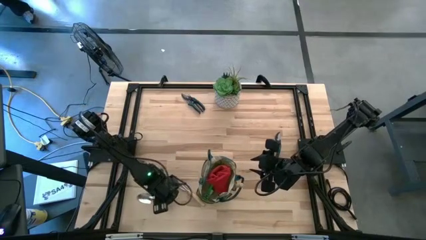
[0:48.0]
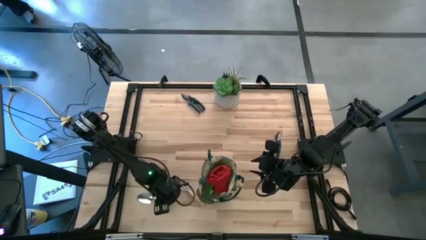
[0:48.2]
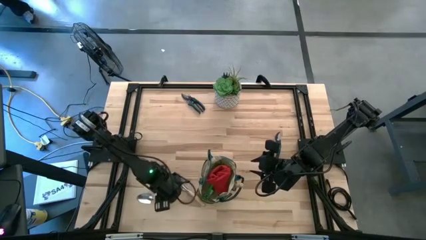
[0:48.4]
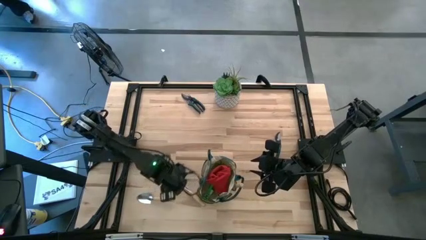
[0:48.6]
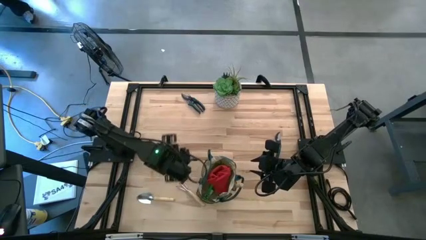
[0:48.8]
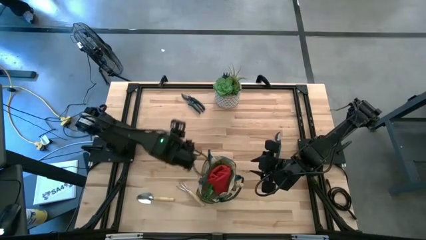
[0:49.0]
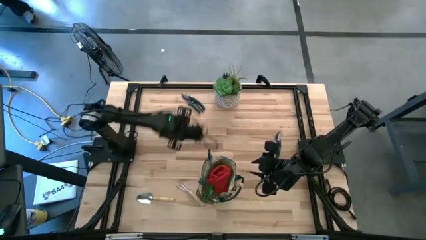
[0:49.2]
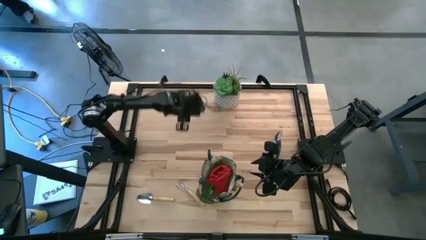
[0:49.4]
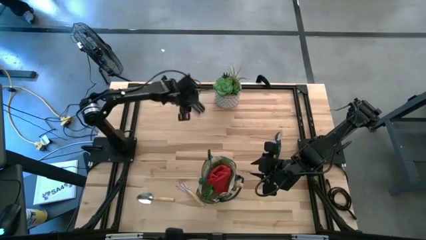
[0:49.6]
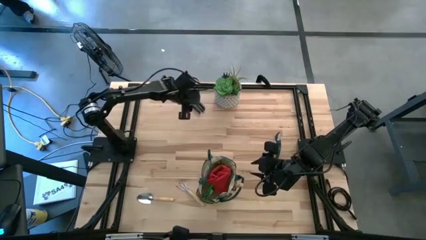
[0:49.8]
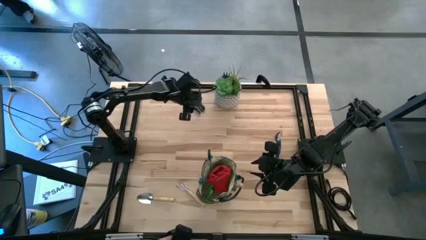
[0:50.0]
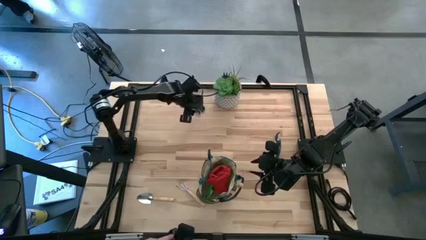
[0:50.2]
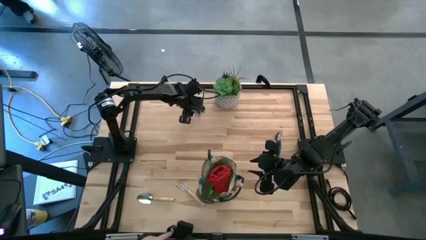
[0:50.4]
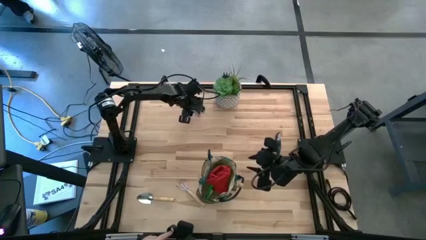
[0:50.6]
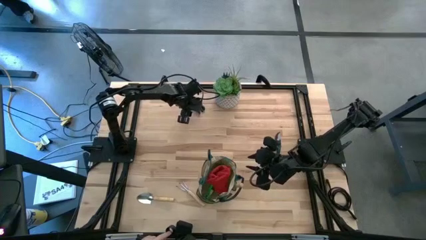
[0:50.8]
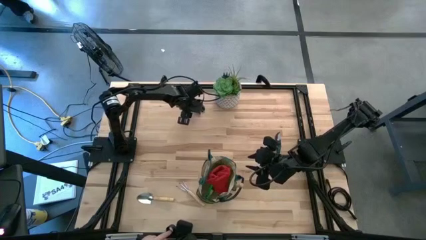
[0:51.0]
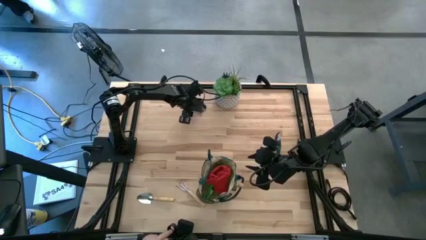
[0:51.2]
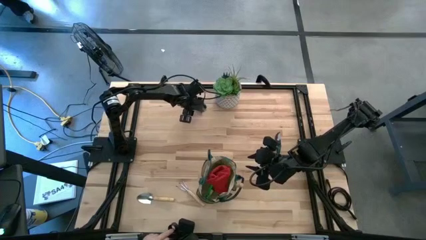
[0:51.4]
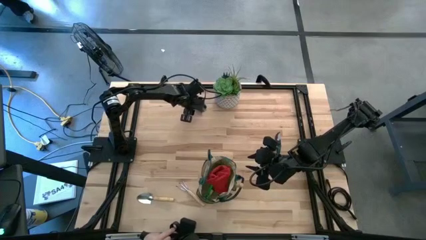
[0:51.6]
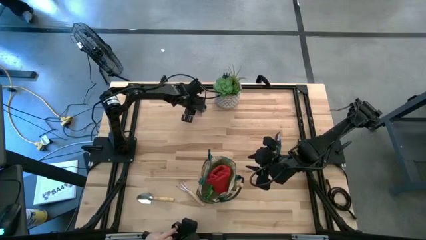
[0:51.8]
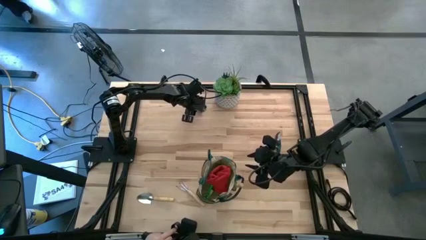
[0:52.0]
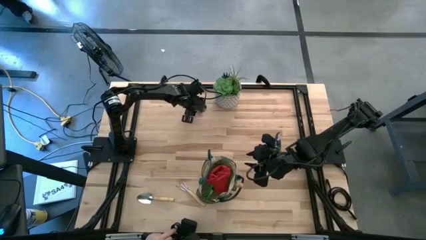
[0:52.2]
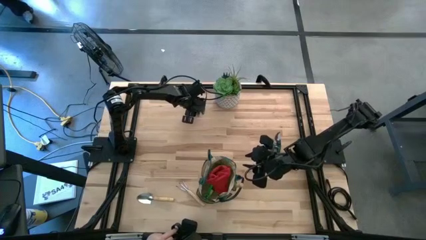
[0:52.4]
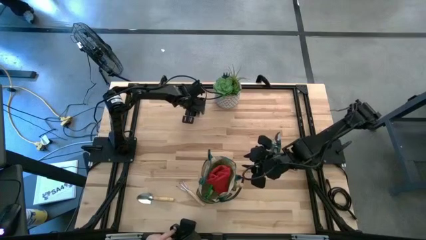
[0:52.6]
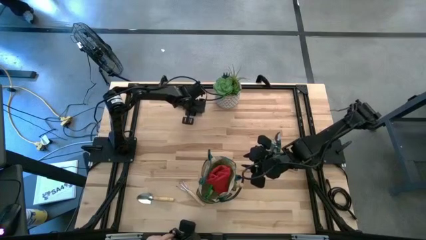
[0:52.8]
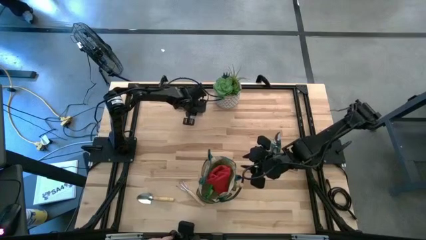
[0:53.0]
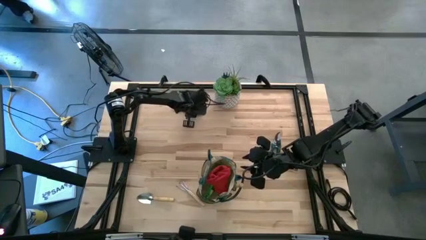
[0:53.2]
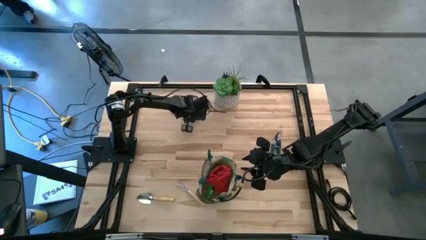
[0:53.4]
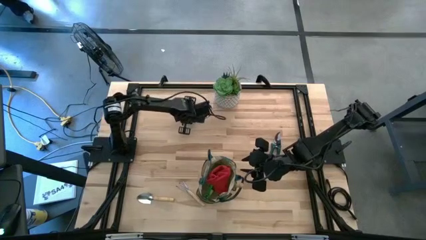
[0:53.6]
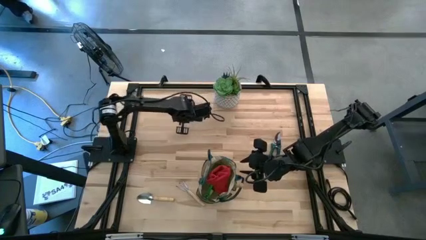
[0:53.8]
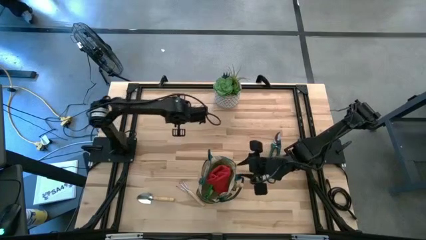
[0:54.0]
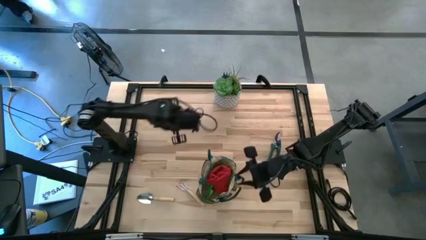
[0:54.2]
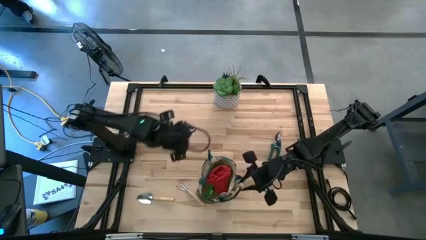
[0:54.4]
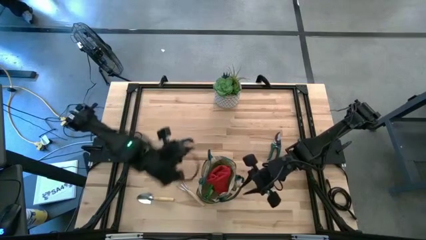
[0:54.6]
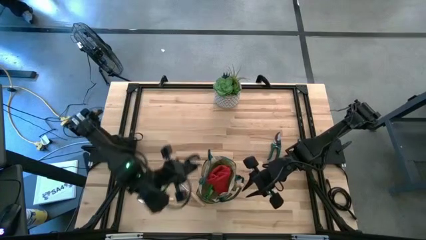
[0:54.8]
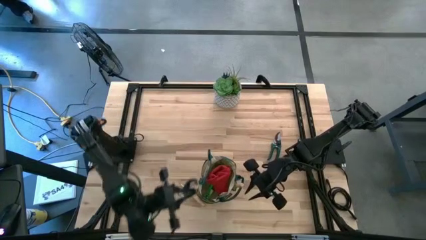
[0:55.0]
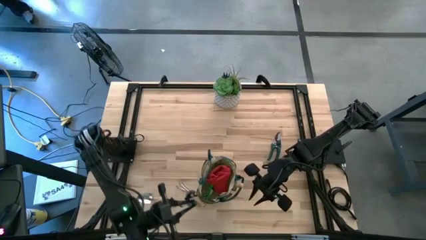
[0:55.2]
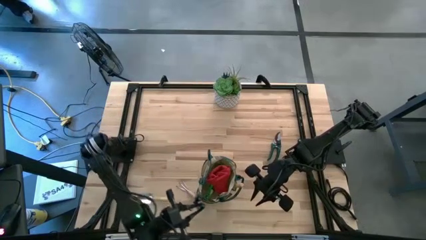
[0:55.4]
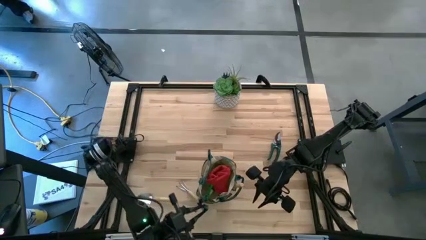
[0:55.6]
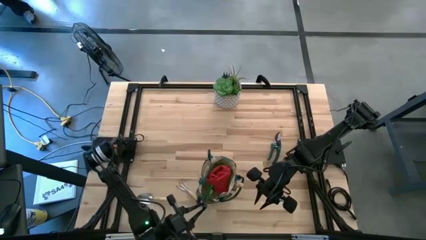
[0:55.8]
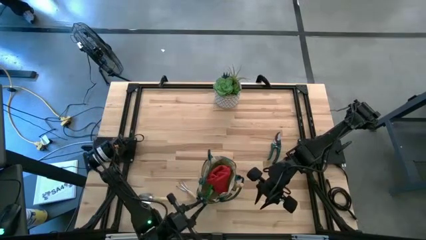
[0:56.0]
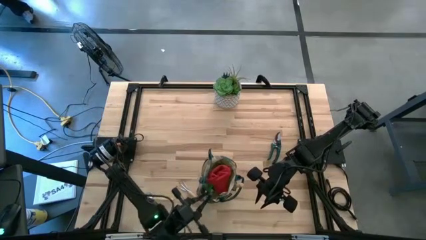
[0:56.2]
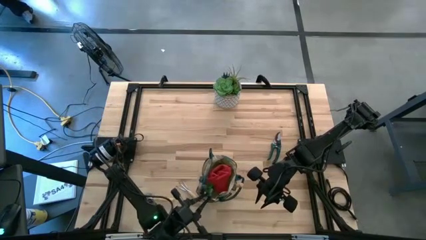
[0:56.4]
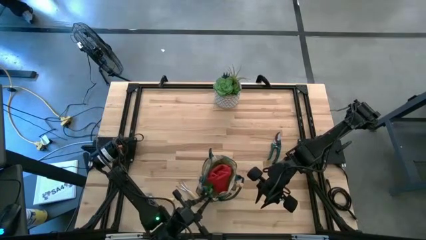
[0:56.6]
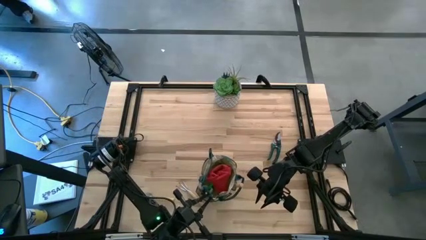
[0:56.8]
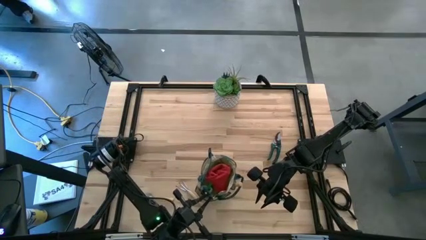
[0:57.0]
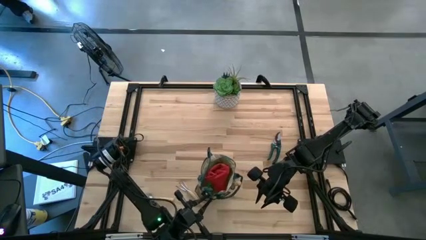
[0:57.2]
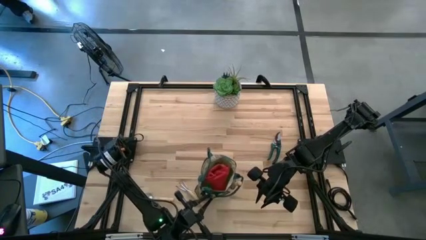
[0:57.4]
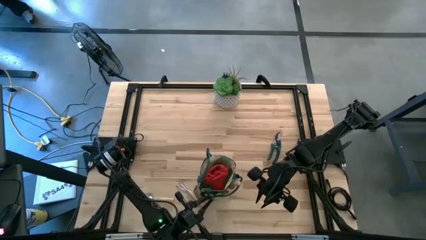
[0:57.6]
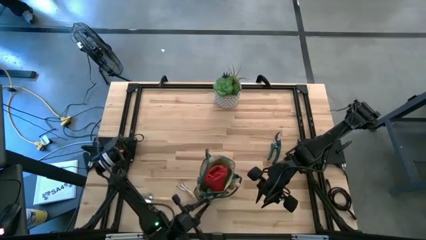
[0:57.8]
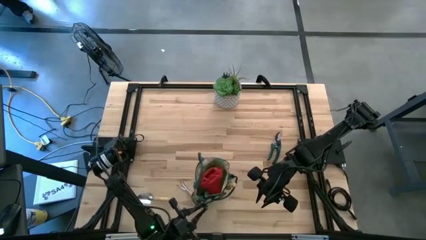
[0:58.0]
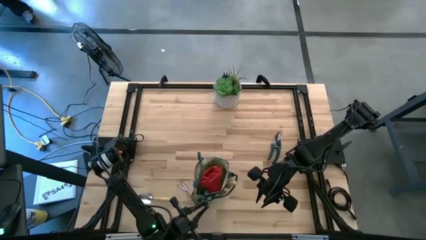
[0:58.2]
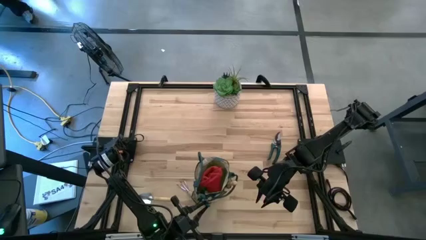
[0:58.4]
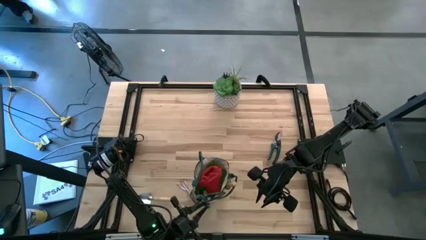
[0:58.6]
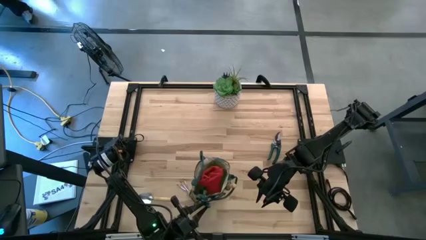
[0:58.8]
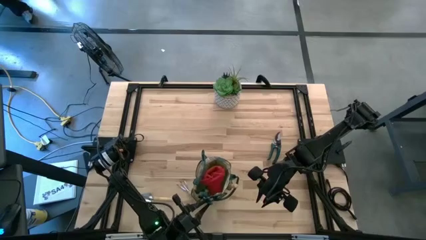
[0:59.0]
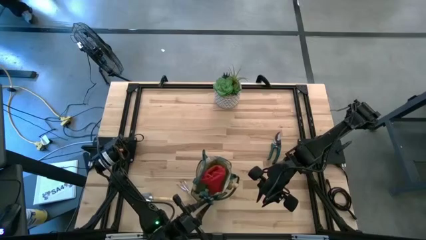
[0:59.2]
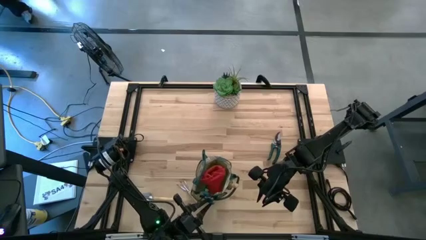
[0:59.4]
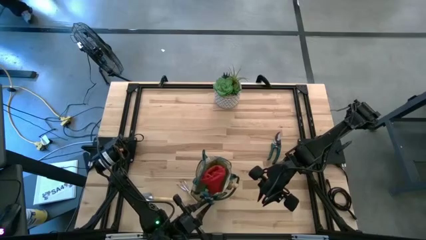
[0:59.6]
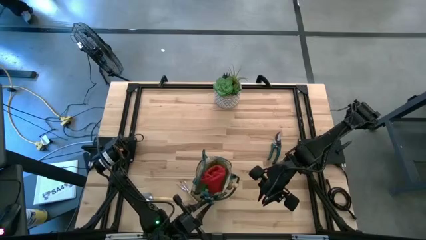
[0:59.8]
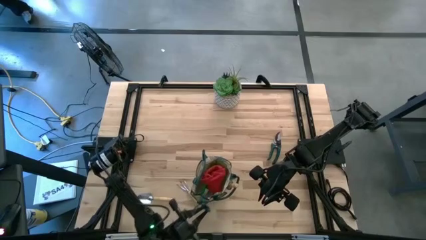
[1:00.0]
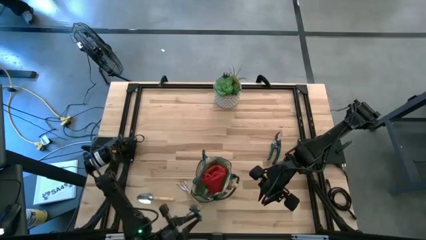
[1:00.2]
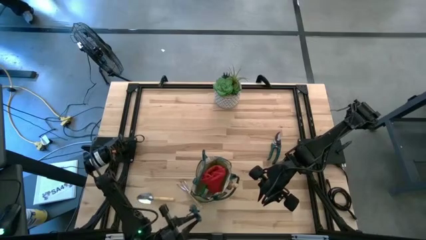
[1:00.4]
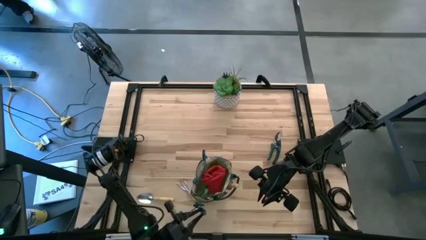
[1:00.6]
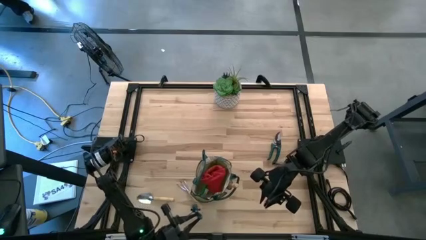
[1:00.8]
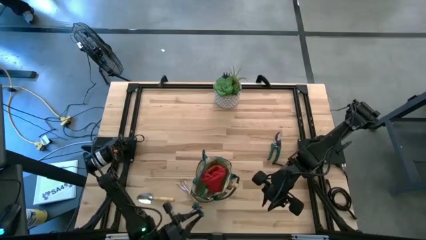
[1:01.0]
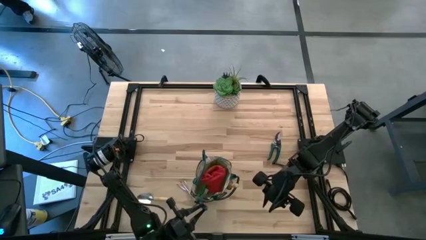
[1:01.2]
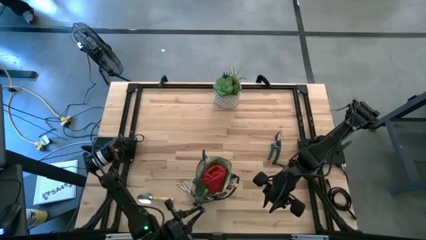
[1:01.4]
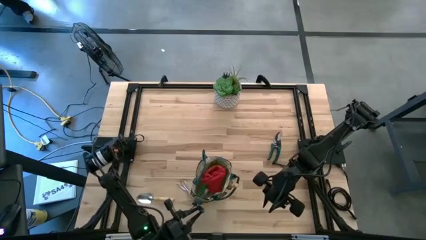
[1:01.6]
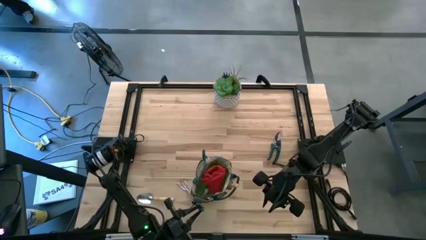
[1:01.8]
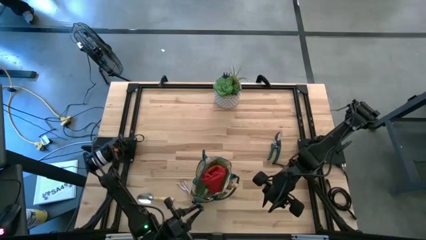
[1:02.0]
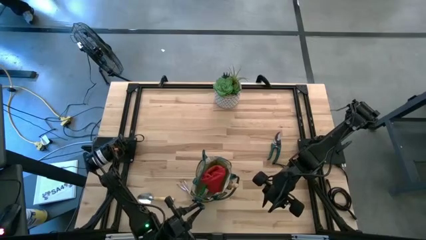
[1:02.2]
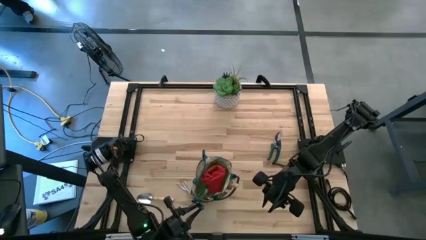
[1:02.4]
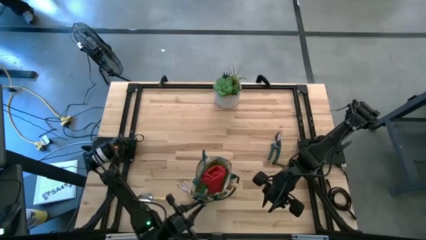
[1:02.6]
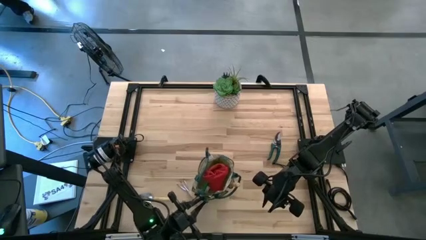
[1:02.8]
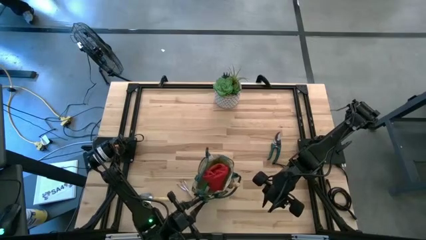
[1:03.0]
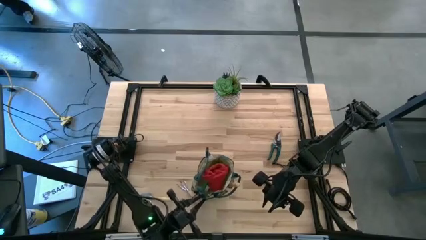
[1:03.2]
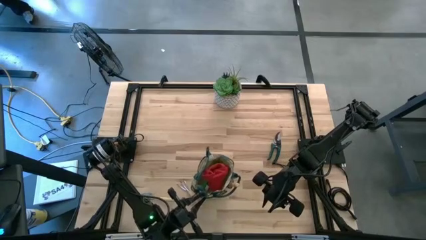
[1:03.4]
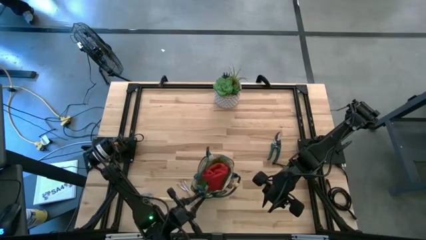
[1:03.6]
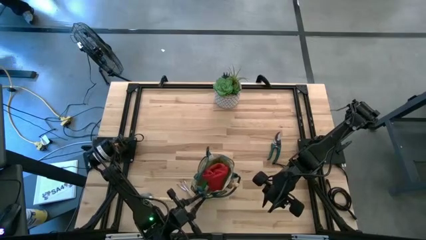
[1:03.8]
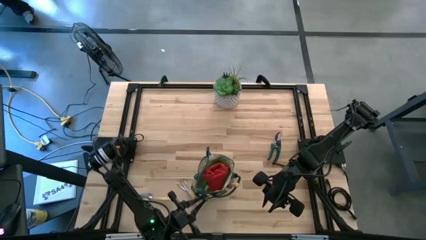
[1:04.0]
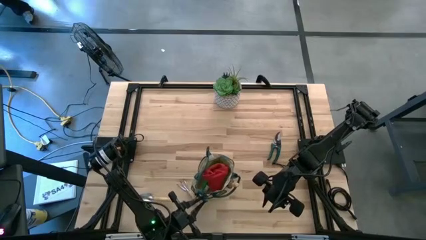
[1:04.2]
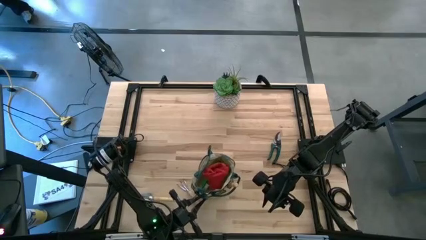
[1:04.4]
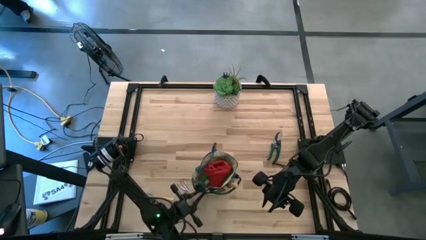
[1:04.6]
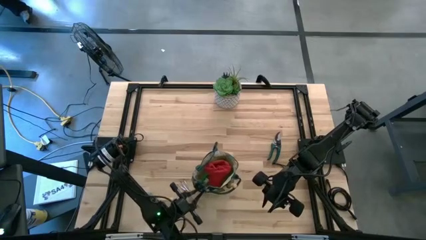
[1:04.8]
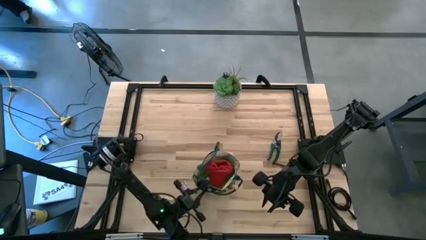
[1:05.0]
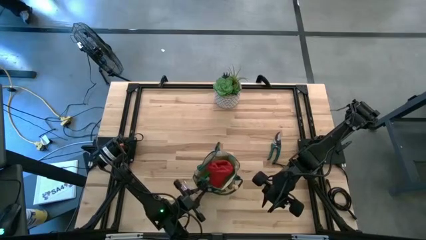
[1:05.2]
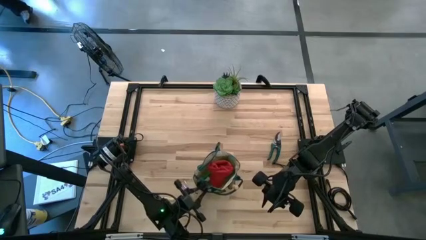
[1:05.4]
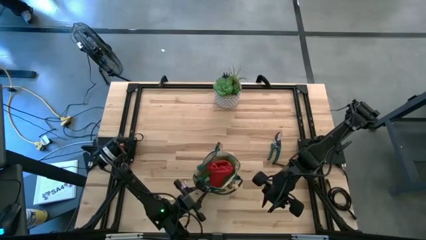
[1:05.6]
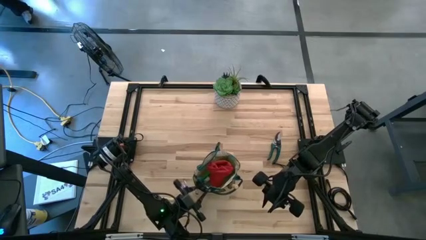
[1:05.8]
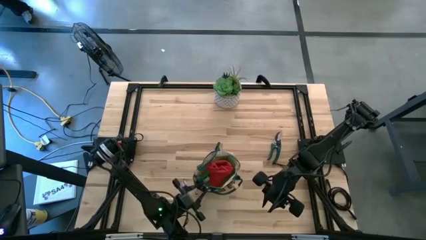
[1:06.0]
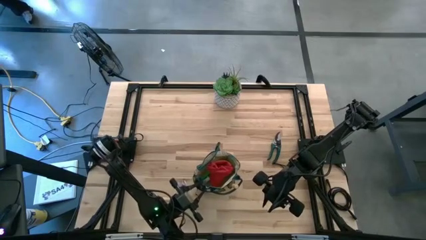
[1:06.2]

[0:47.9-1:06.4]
Task: Pick & Place Garden tools in Gardening bag
Put the green shear scissors into the white gardening bag
